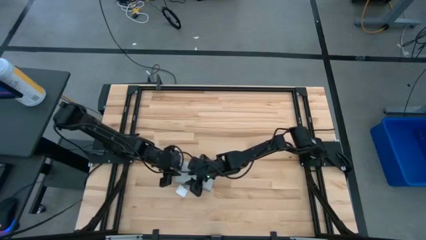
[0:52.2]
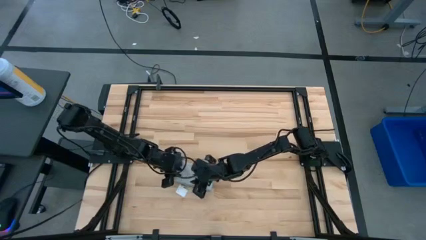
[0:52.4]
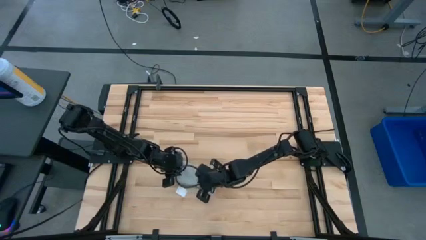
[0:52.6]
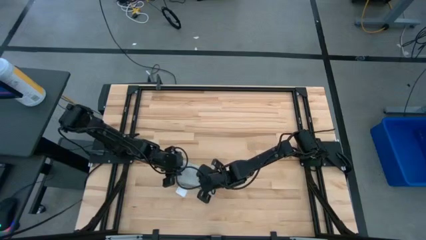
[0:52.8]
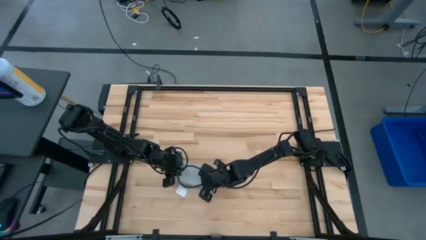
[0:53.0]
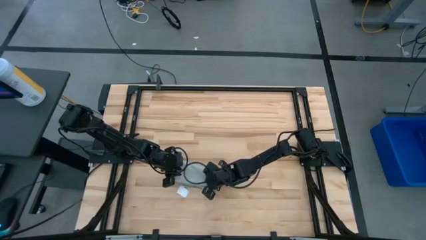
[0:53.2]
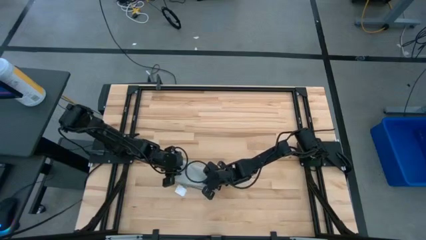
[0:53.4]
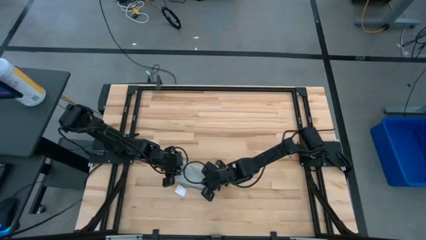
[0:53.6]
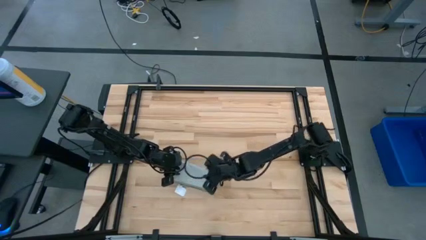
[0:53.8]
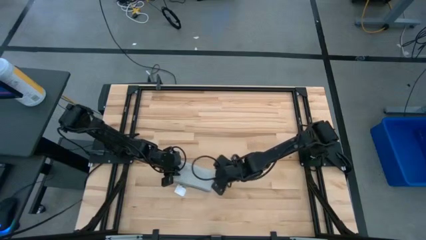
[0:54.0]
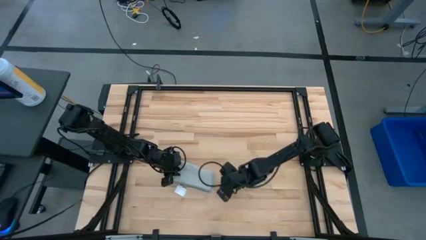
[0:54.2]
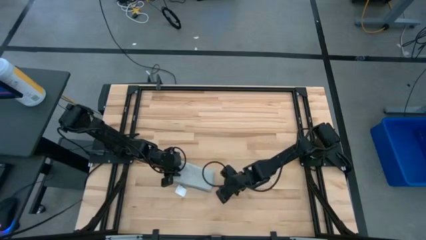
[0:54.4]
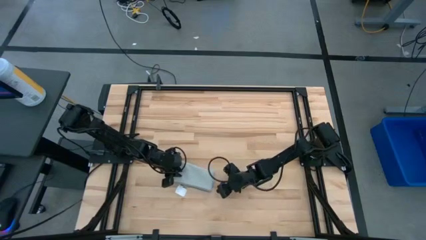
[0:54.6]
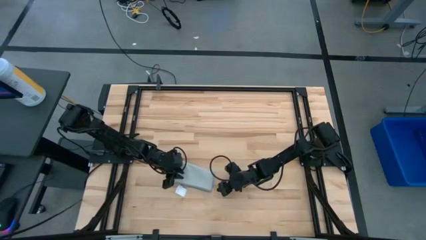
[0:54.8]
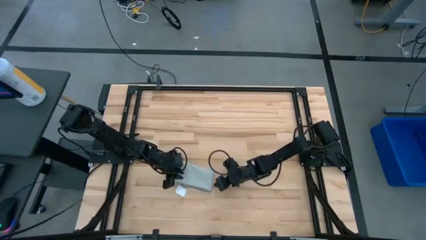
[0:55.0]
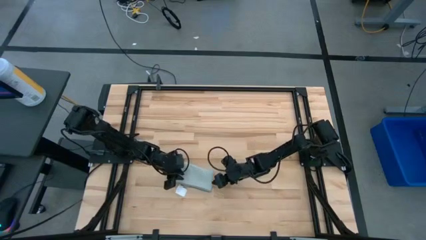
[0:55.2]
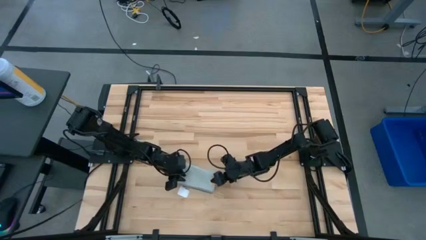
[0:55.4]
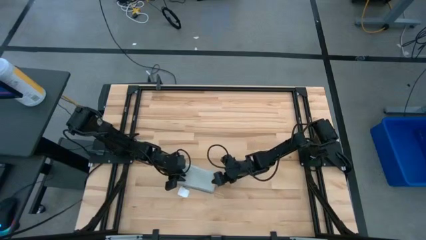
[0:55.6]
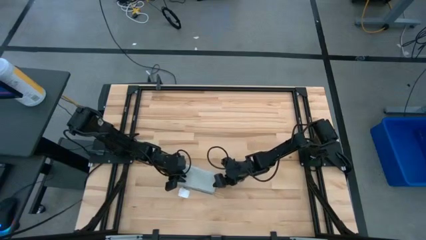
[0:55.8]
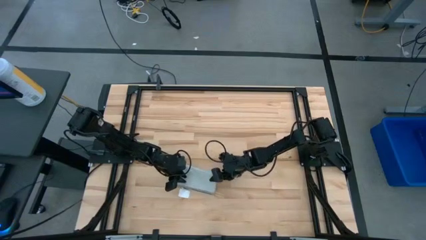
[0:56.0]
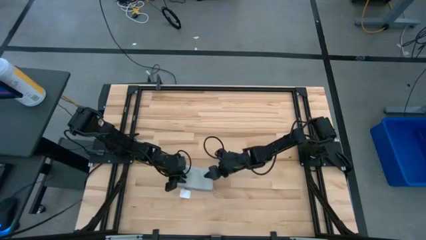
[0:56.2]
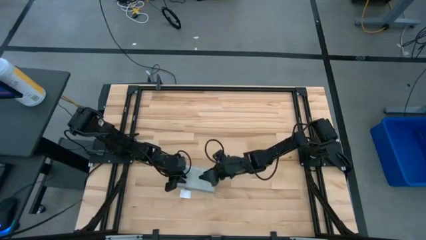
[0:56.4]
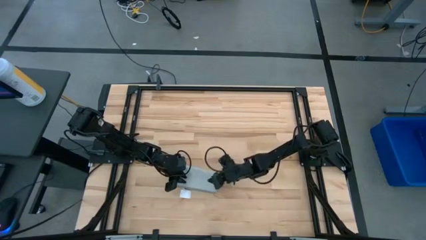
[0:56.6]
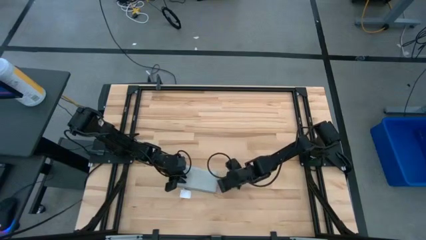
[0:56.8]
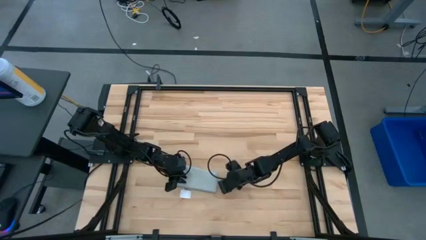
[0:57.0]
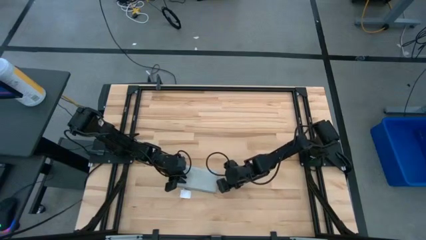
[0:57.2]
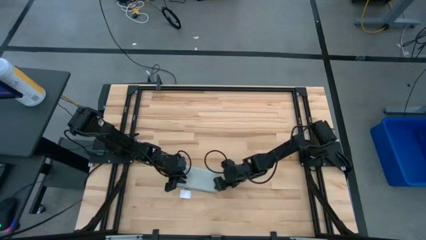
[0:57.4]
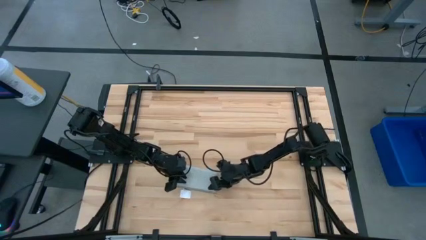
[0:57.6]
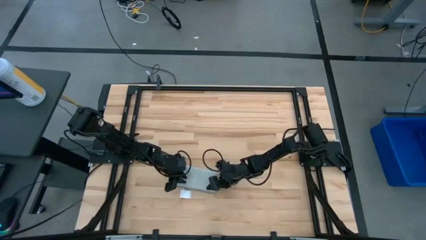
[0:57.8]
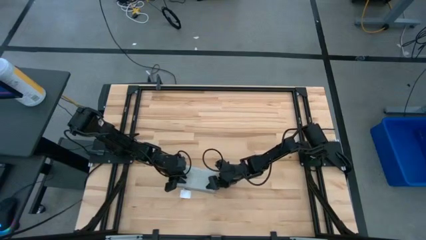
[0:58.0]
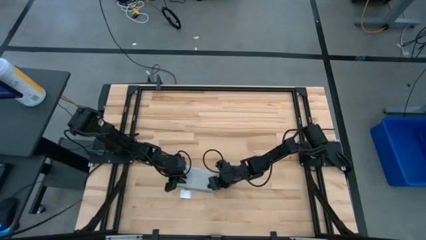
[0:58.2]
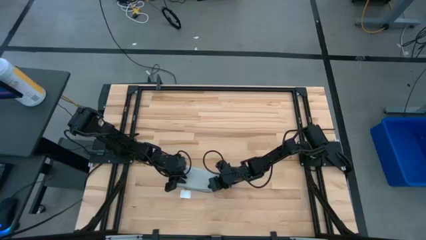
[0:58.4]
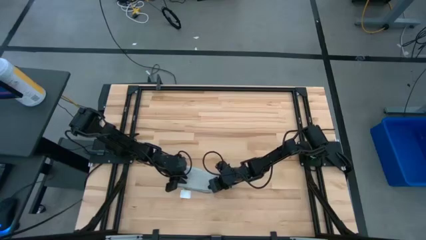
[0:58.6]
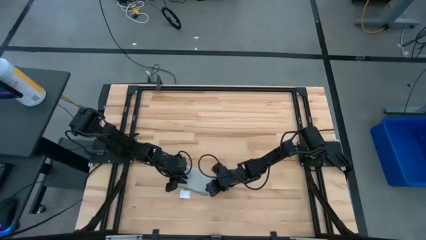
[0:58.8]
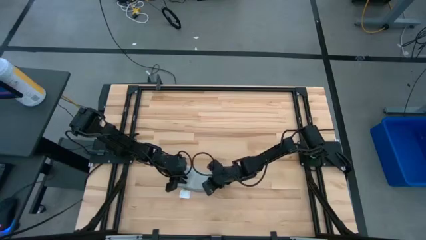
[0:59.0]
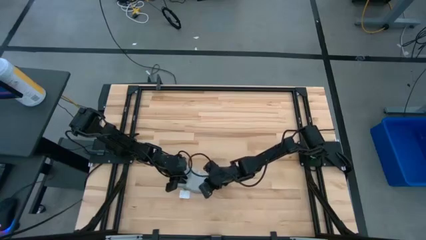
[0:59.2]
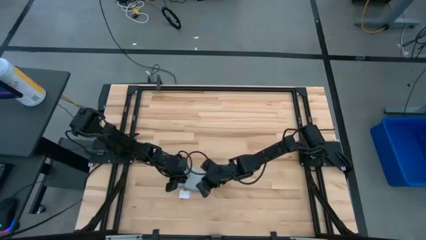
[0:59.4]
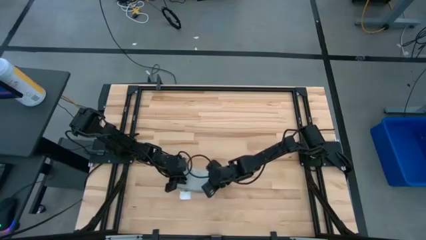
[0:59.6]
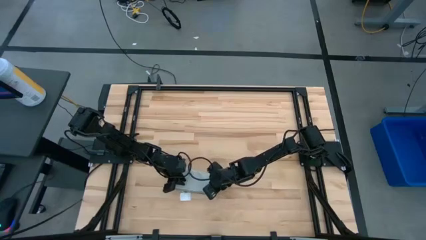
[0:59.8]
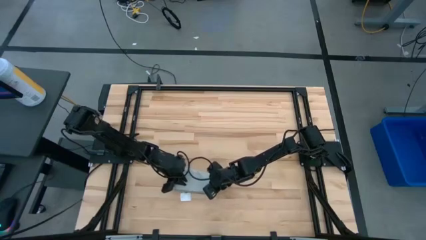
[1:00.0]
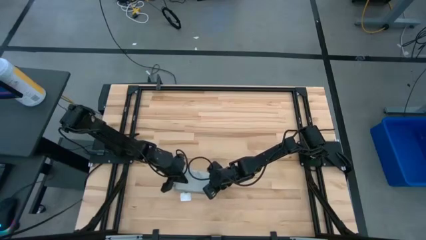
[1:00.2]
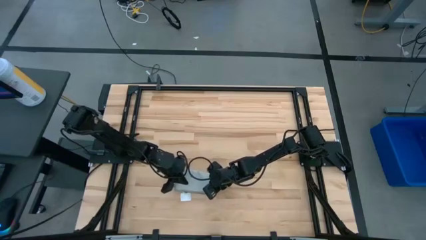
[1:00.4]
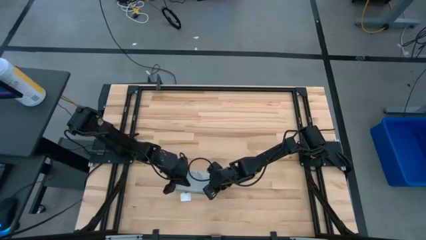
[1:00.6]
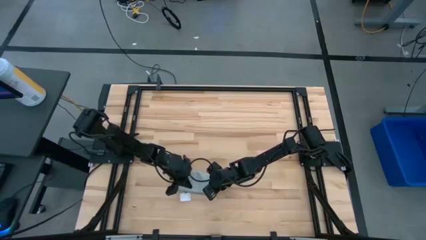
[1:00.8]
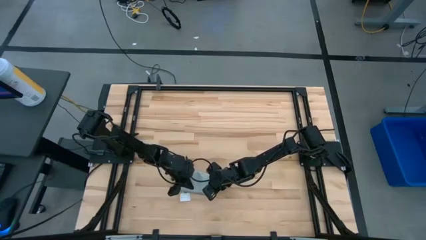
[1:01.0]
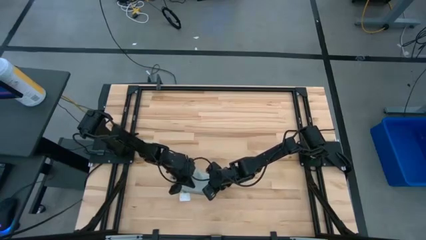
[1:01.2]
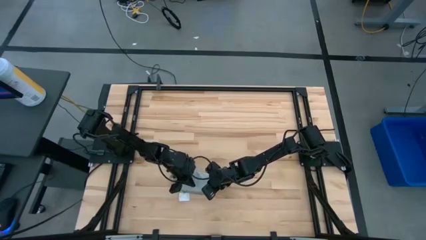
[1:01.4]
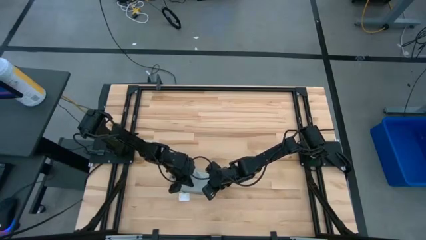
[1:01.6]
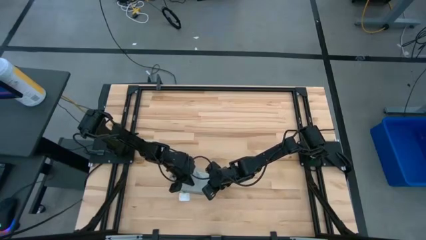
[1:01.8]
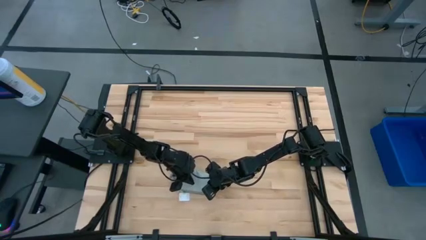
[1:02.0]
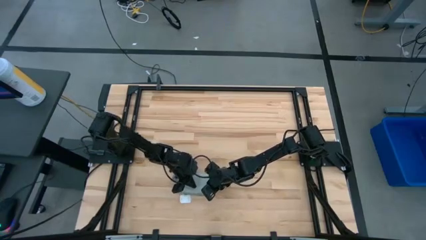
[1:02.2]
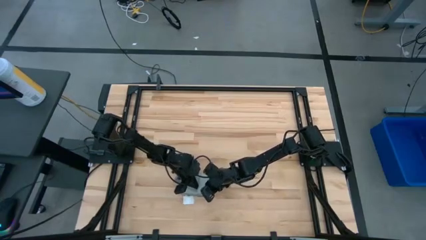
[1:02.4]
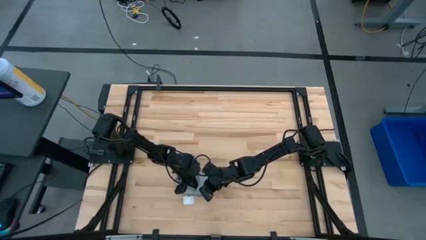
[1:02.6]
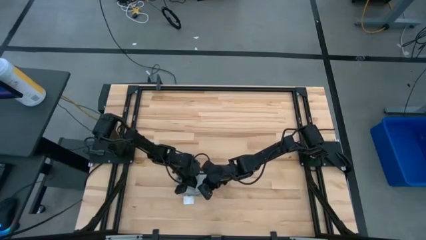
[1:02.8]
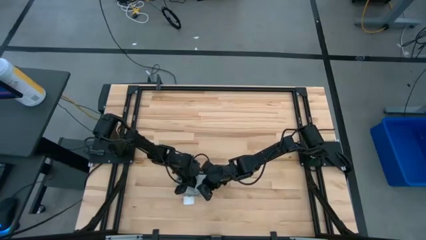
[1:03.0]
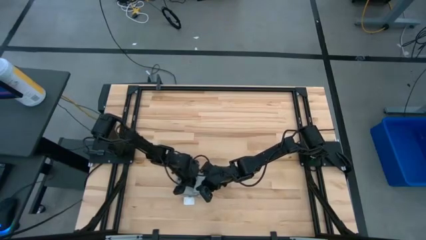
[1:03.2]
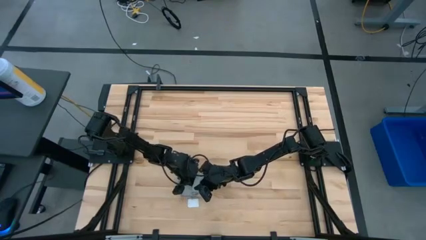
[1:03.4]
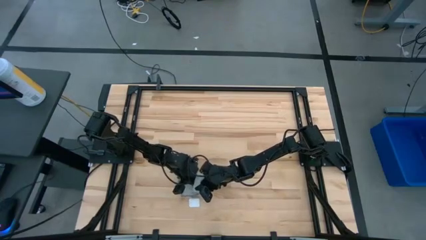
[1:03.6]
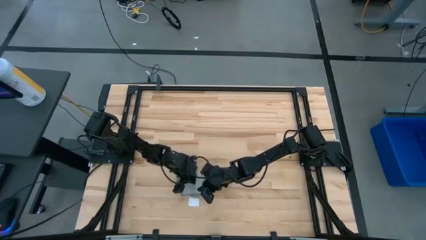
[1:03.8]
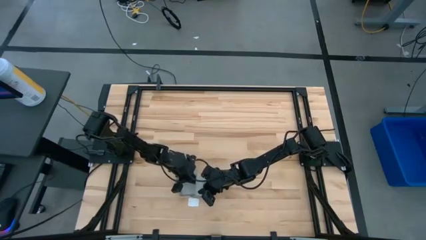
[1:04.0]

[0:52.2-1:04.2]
Task: Fold microfiber towels
Fold the gray towel
